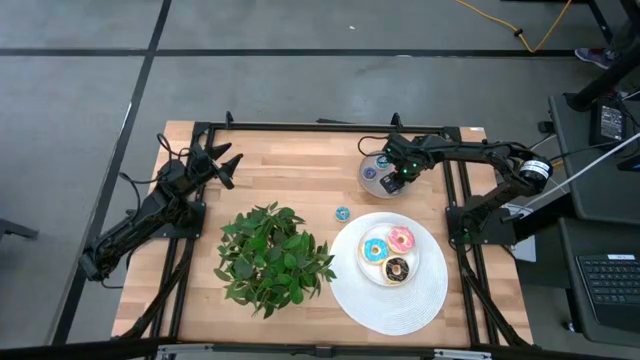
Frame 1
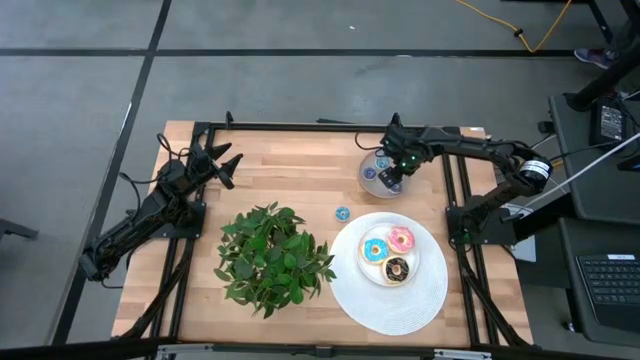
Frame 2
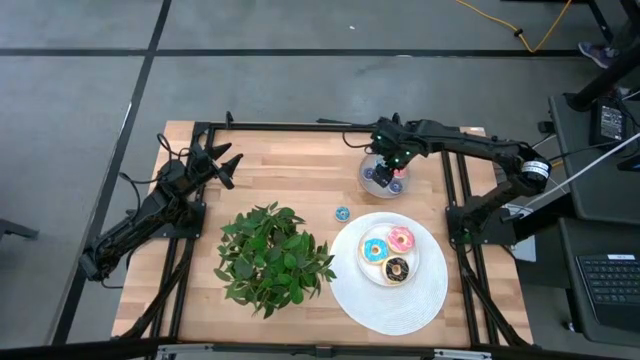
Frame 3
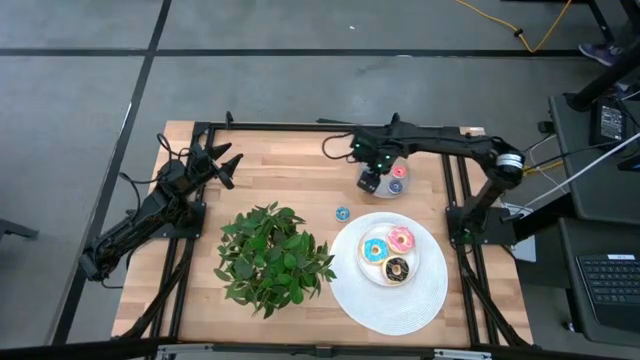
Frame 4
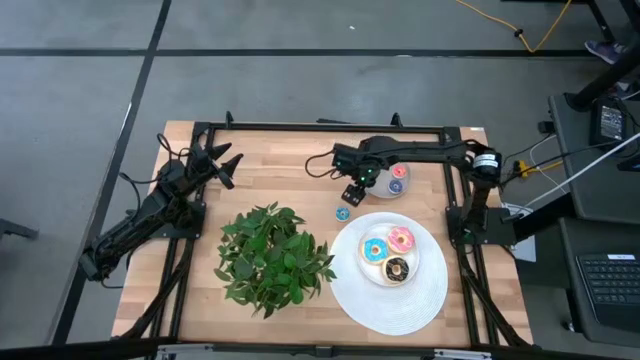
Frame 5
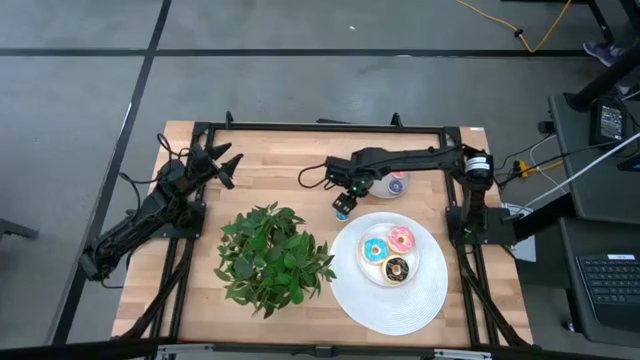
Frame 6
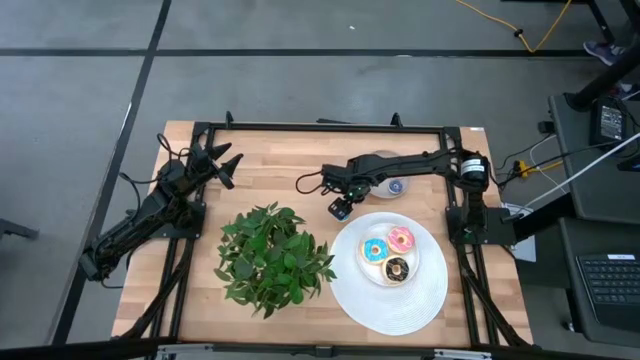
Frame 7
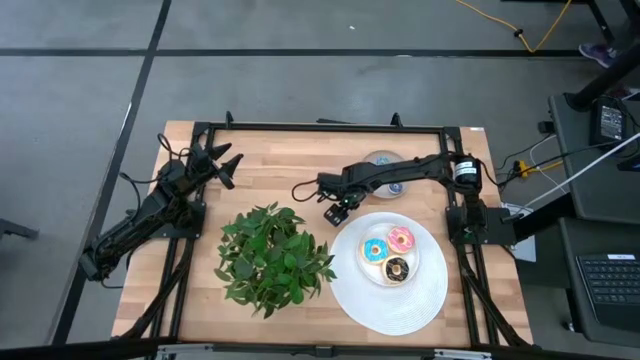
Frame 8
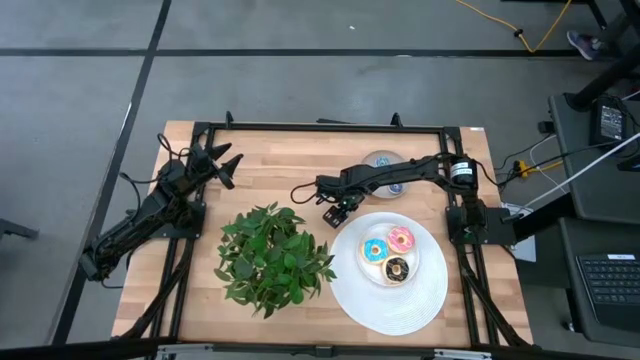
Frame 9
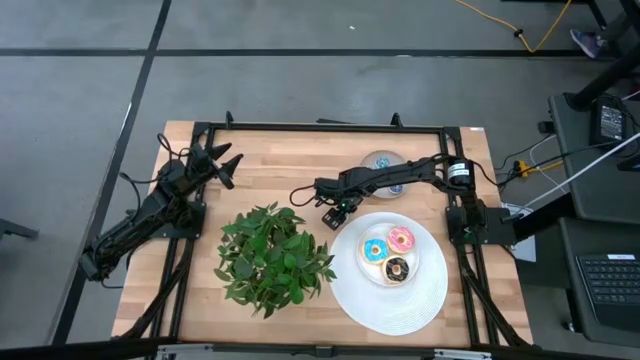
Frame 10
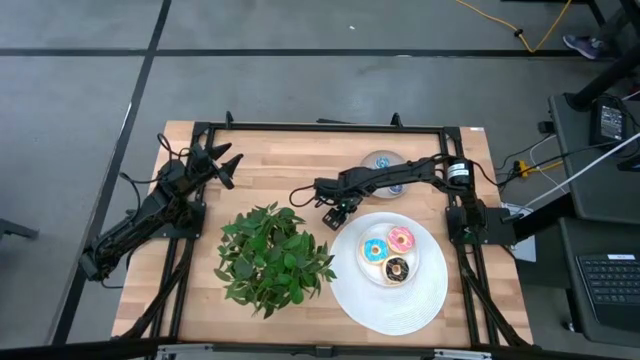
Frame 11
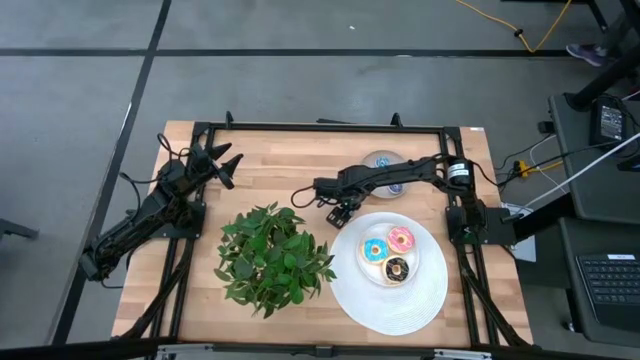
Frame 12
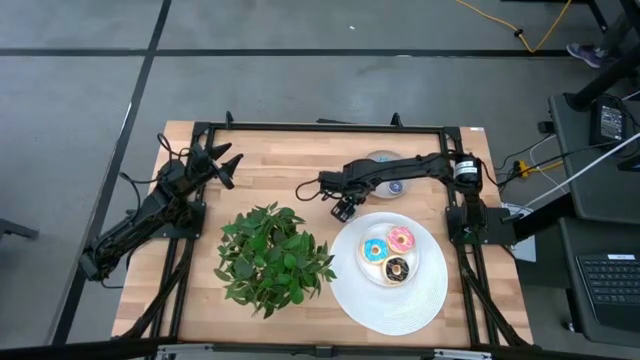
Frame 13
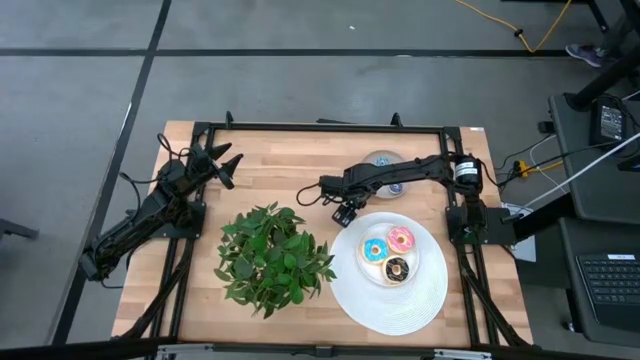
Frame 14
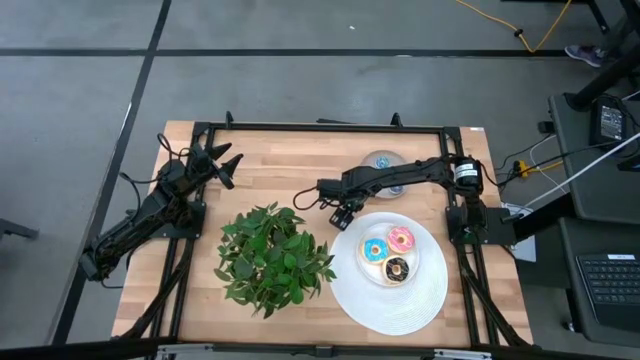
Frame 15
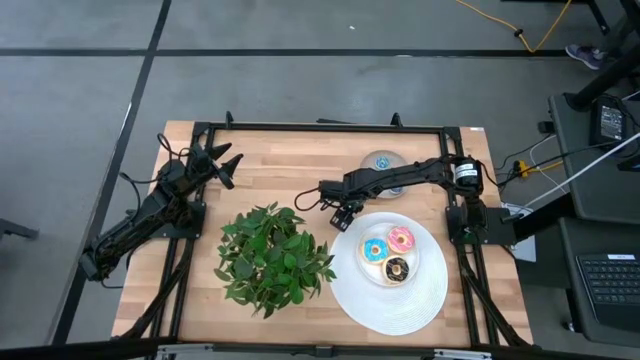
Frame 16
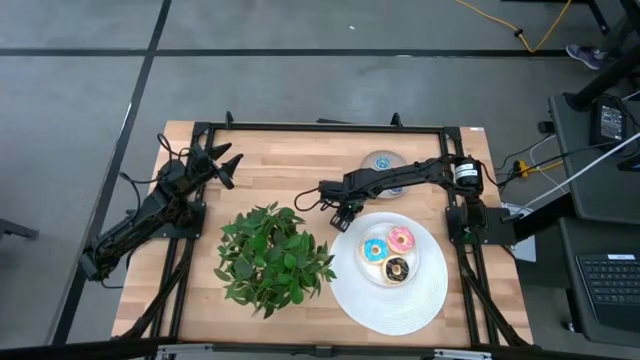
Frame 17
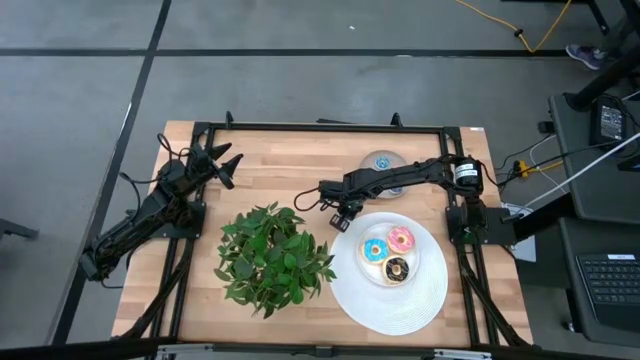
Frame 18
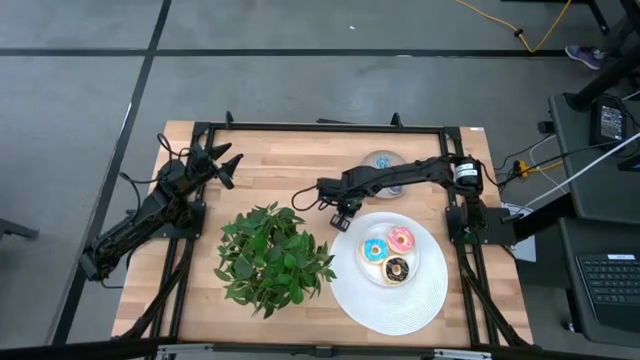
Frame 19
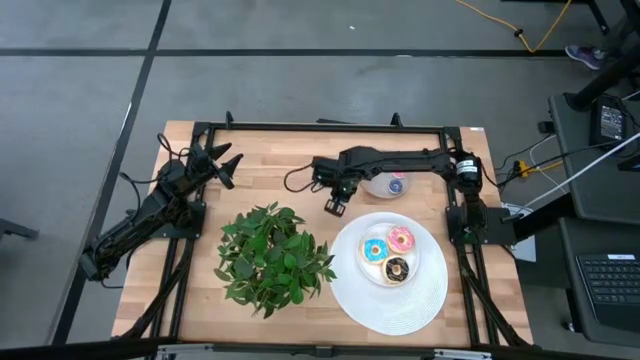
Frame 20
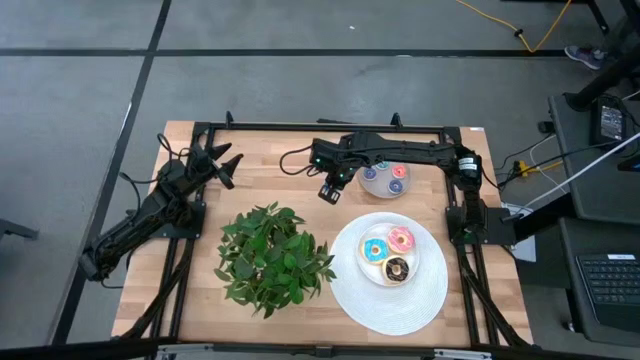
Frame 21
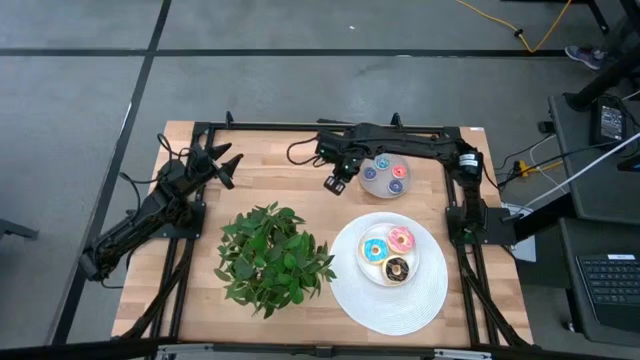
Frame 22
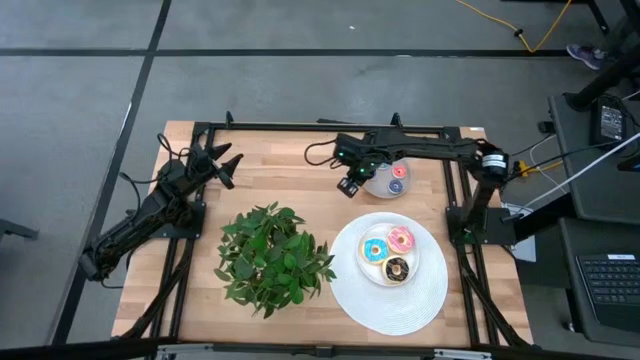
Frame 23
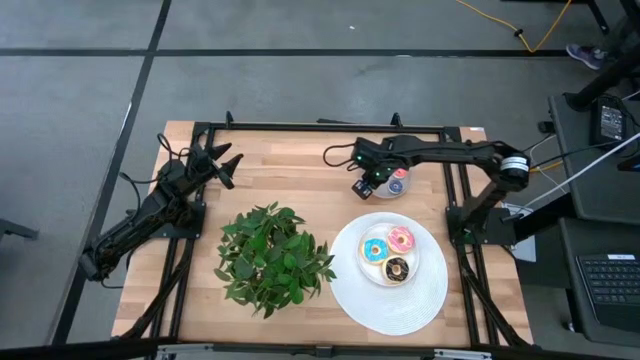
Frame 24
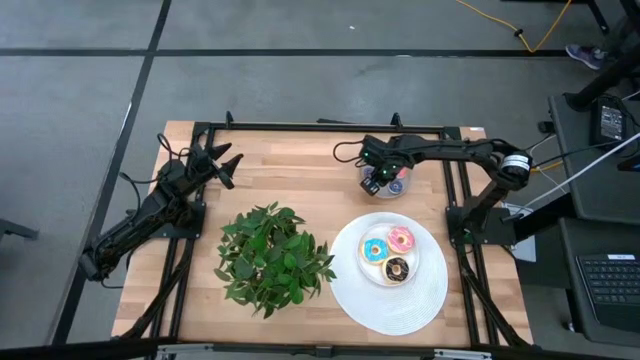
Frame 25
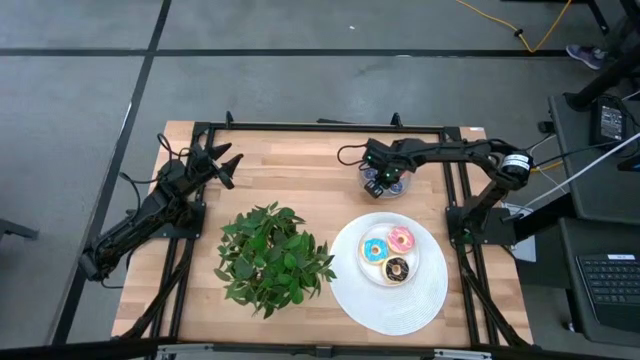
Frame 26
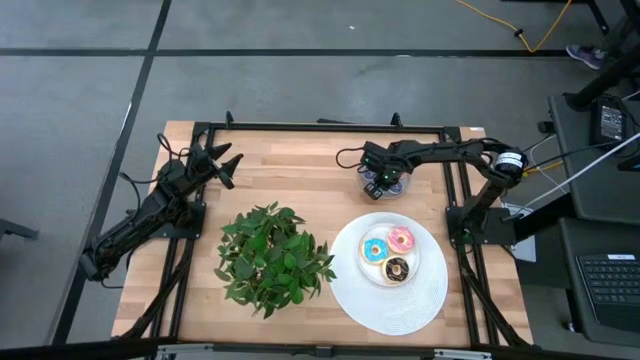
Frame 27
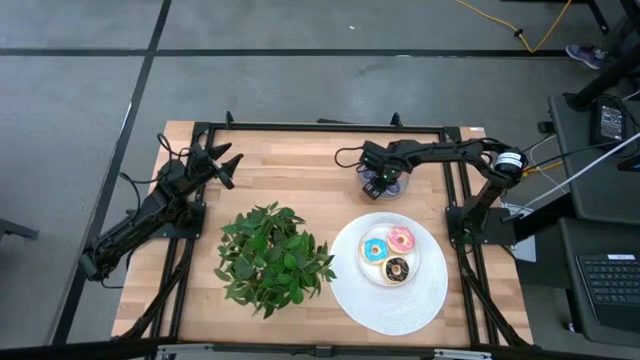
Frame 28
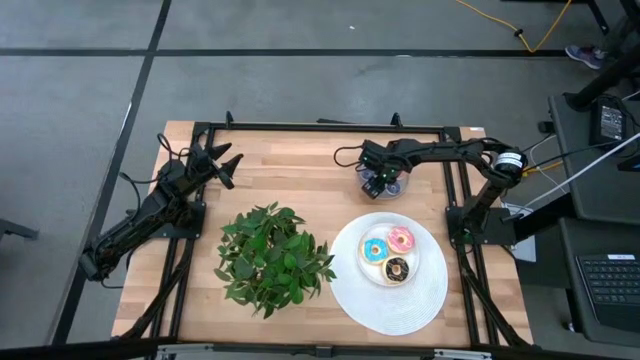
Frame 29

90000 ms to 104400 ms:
Task: Pick & Place donuts
Put the small blue donut onto the gray plate

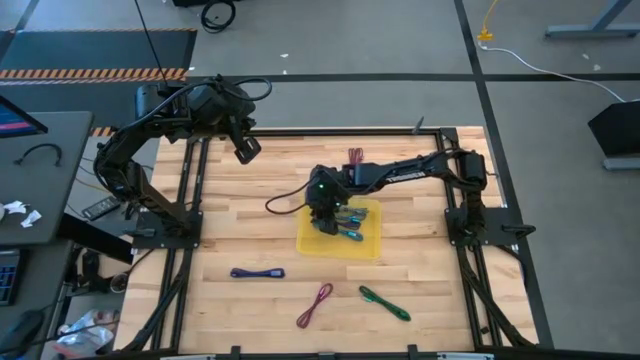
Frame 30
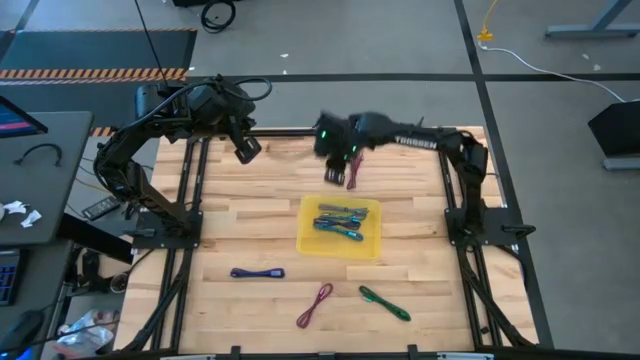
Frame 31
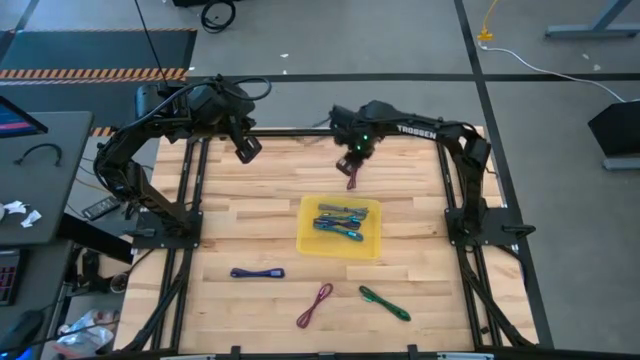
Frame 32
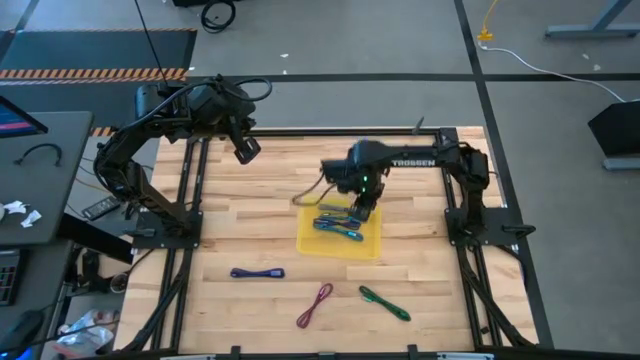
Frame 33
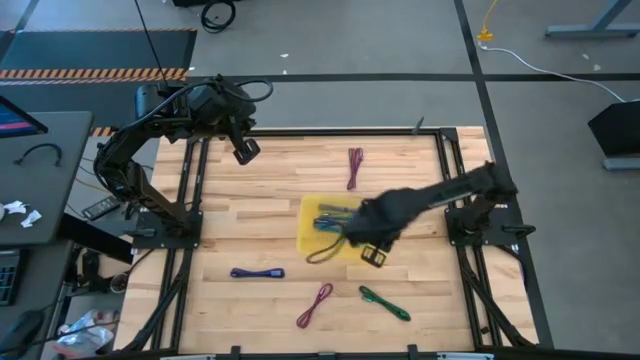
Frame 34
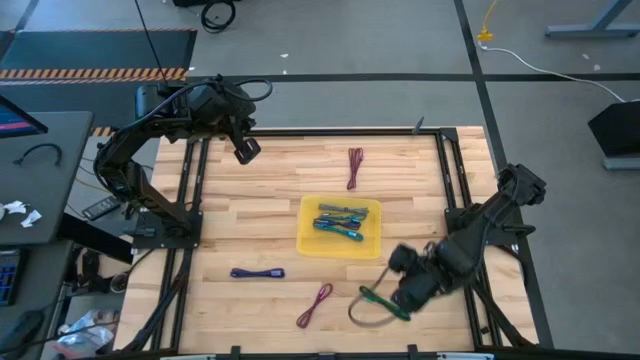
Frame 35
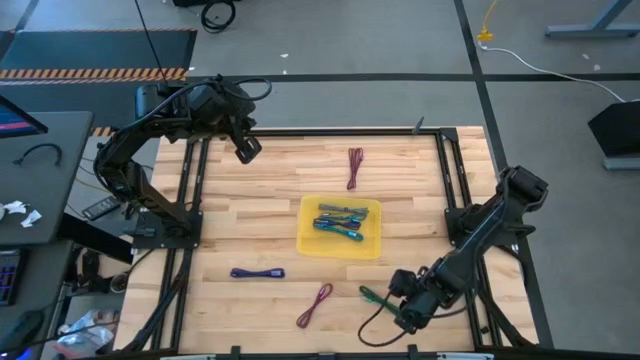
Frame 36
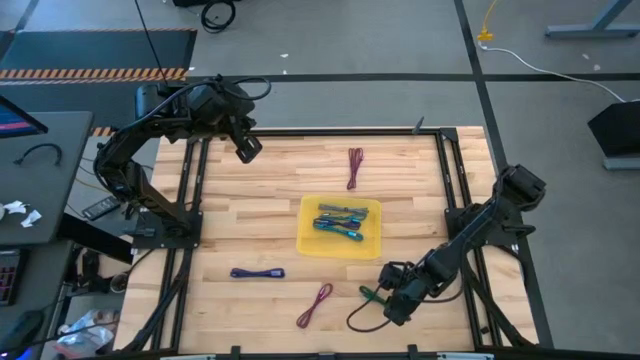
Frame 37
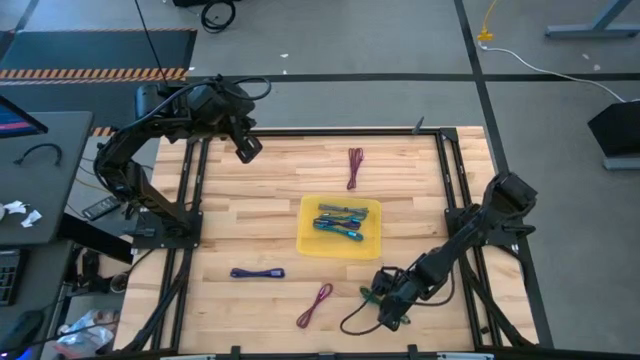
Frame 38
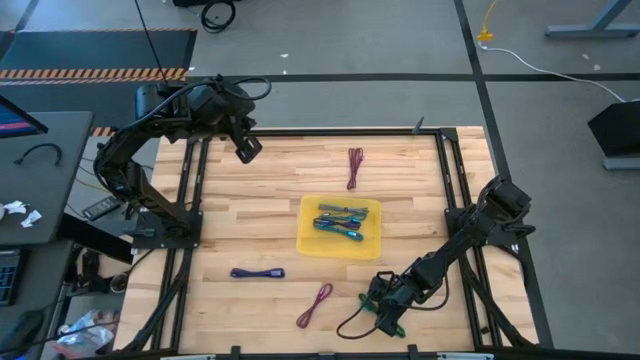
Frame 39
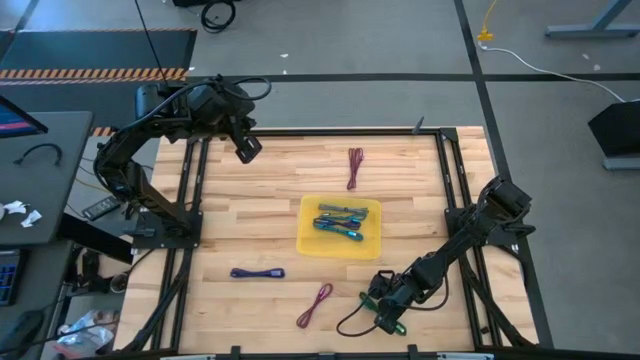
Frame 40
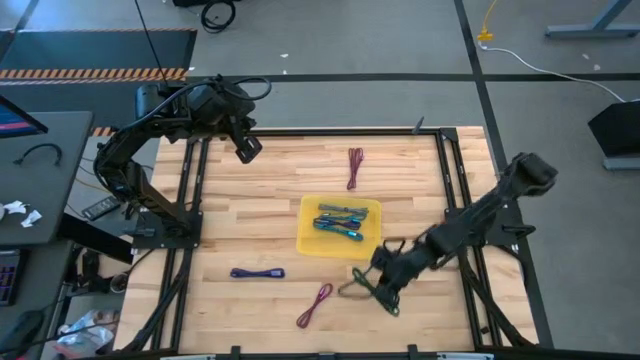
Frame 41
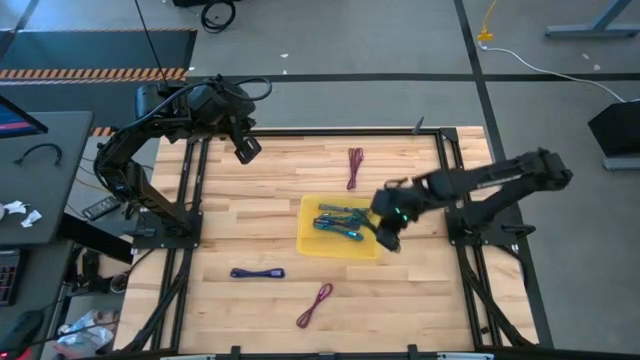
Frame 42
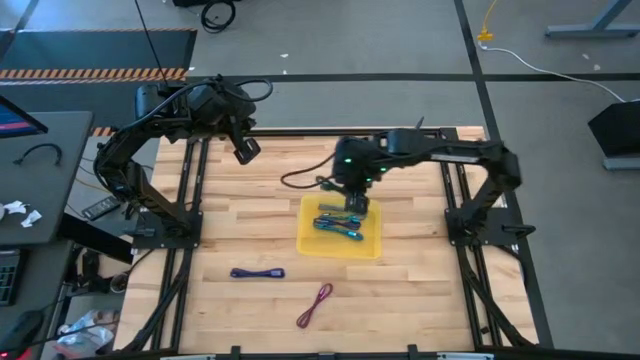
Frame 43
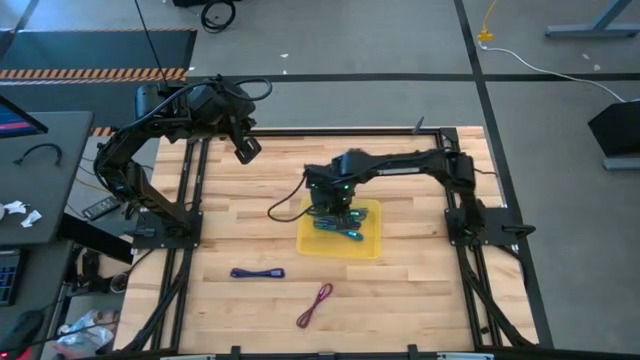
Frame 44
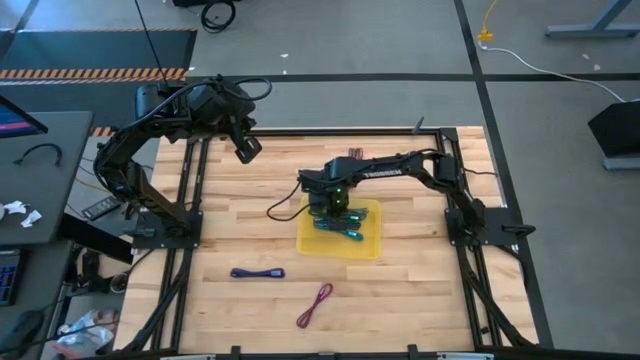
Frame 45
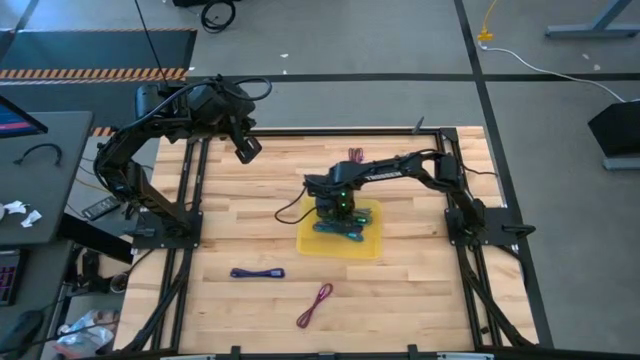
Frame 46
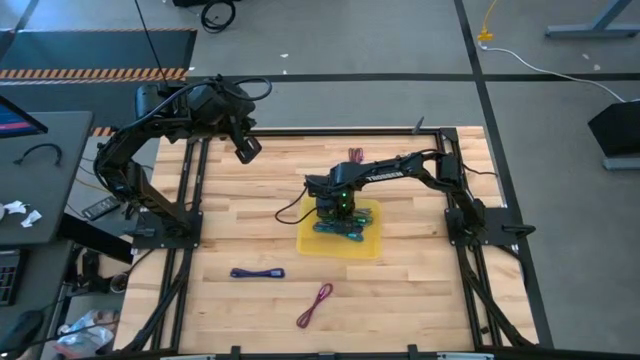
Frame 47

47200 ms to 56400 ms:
Task: Pick and place USB-C Cables
Put the green charger cable into the yellow bin
